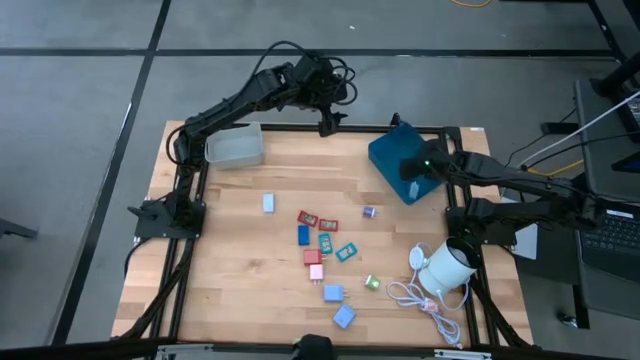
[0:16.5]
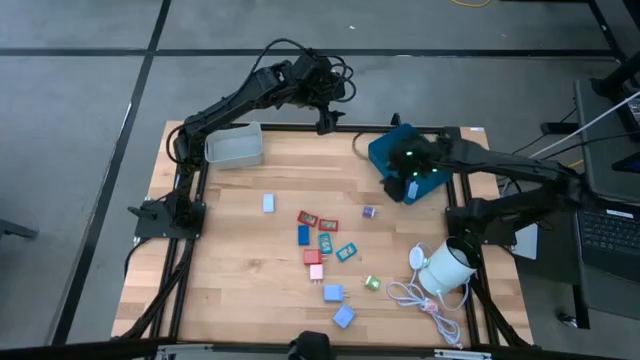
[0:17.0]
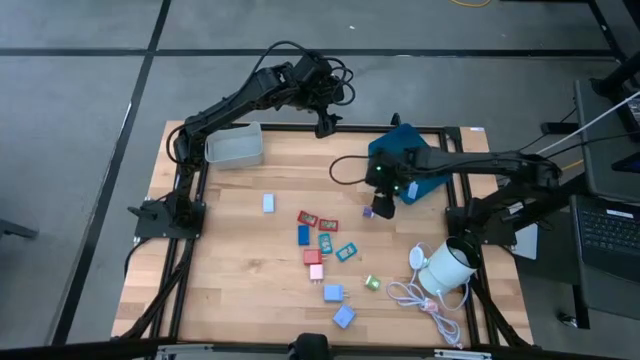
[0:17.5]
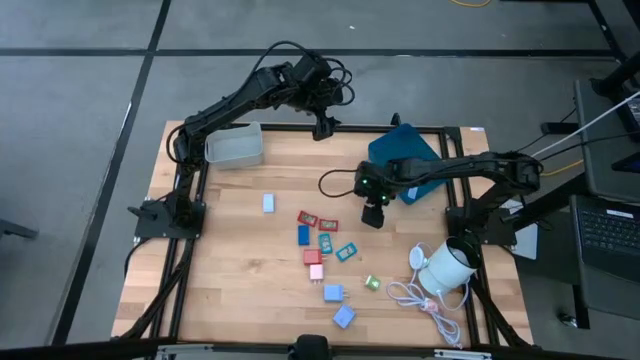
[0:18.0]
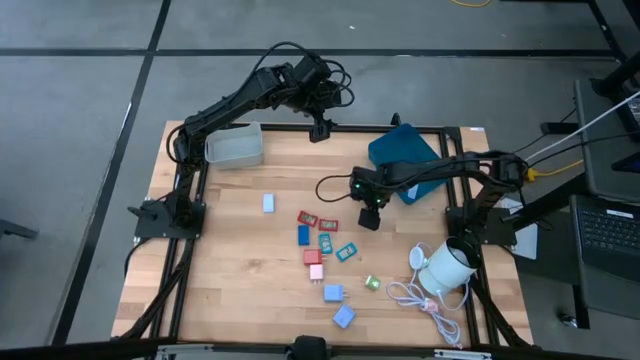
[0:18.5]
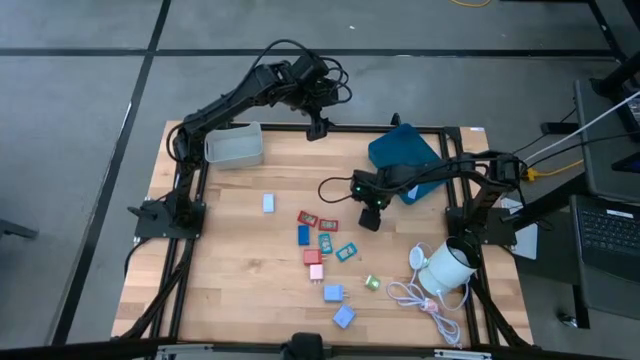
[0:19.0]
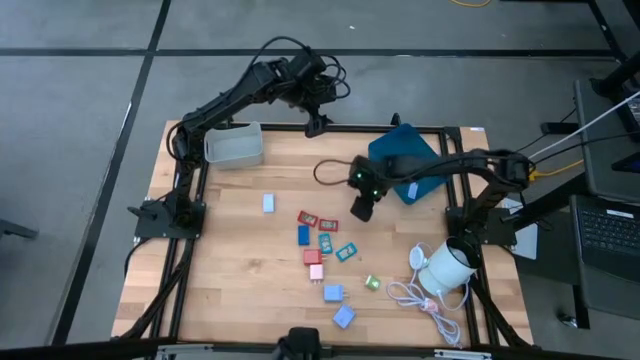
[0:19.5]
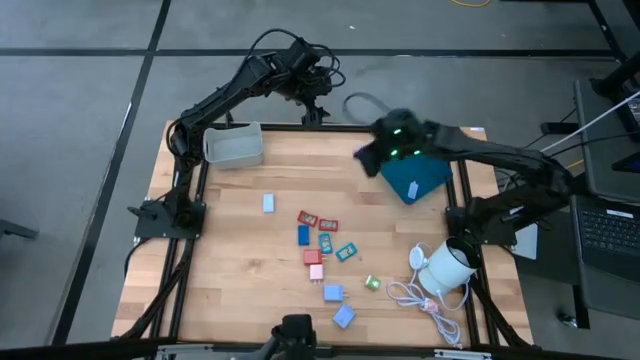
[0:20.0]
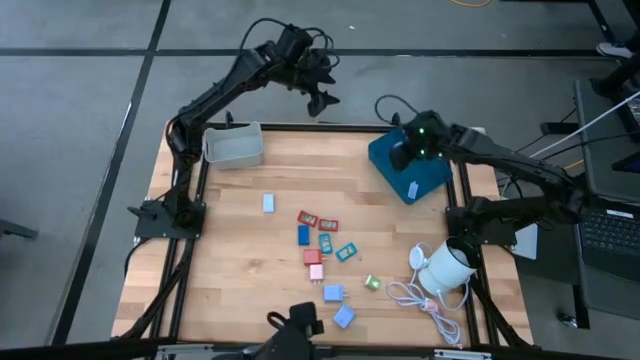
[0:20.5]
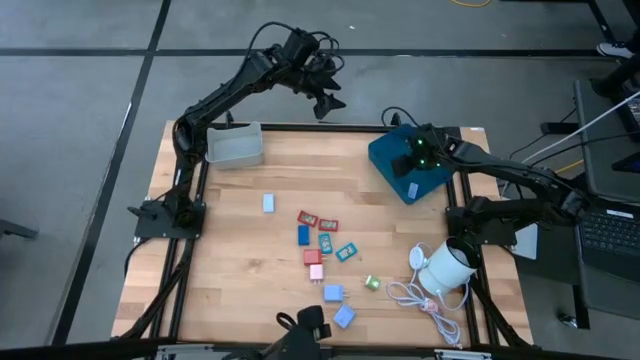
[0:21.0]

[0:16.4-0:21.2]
Task: Pick & Place Office items
Put the violet charger adapter into the blue bin

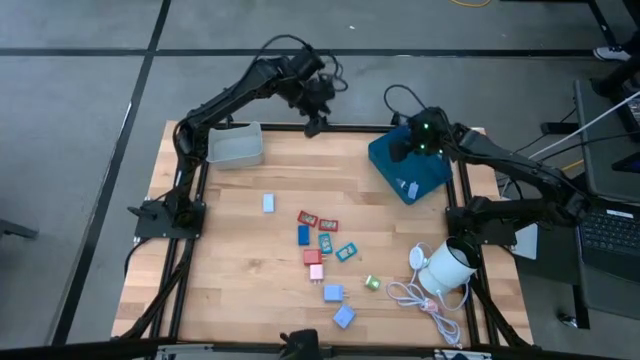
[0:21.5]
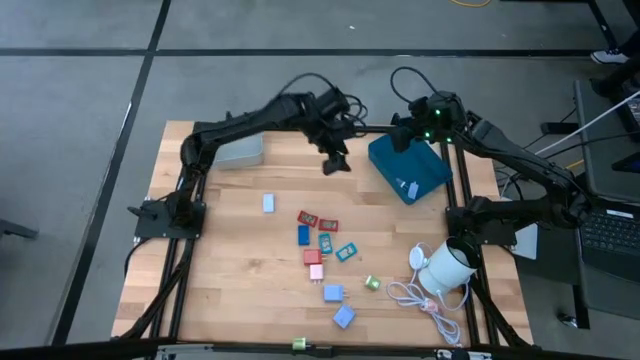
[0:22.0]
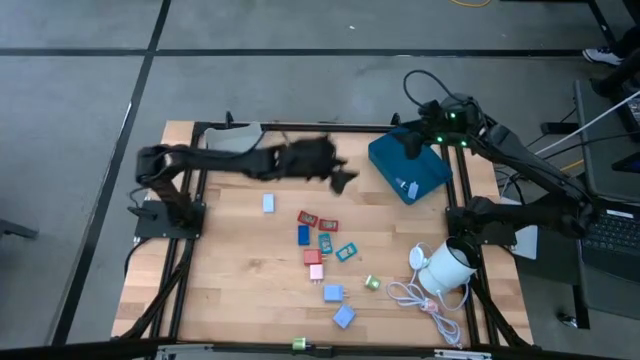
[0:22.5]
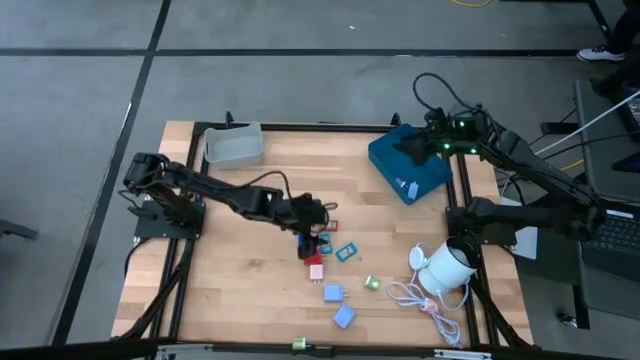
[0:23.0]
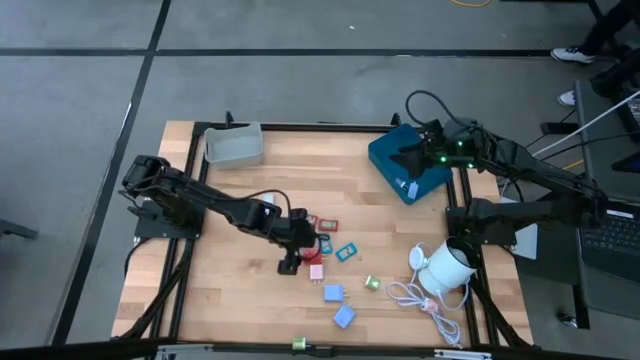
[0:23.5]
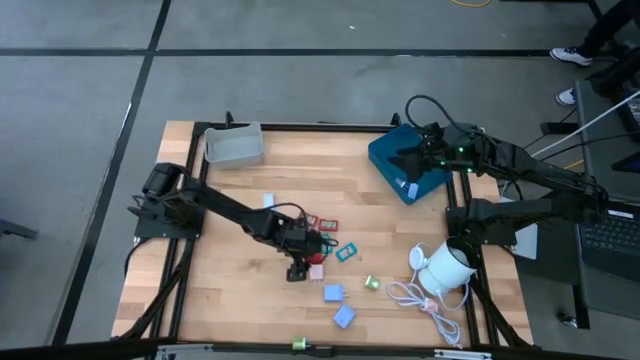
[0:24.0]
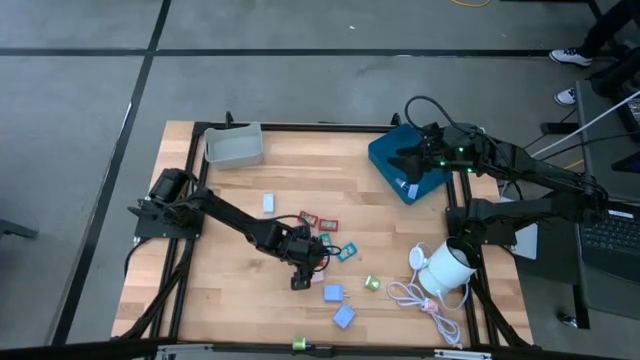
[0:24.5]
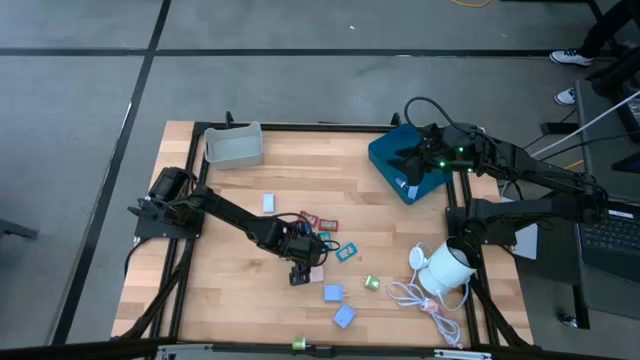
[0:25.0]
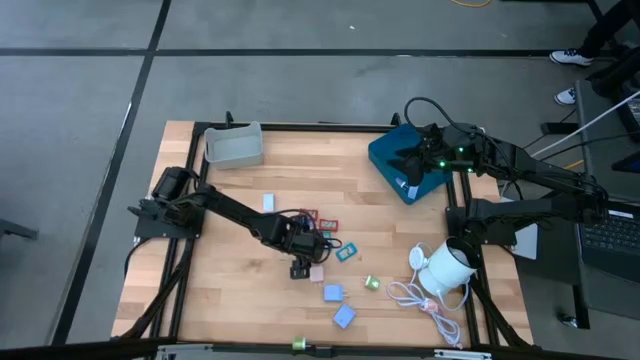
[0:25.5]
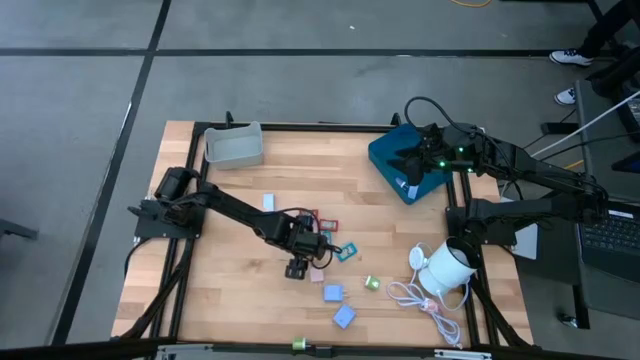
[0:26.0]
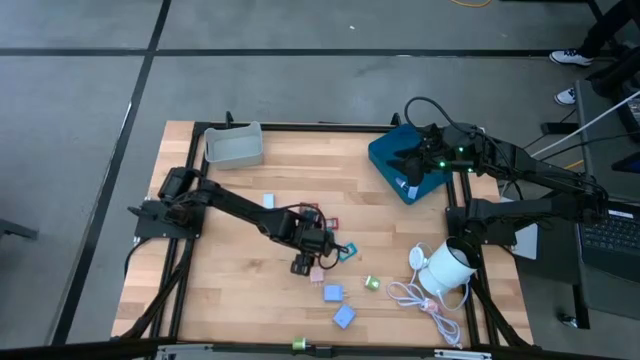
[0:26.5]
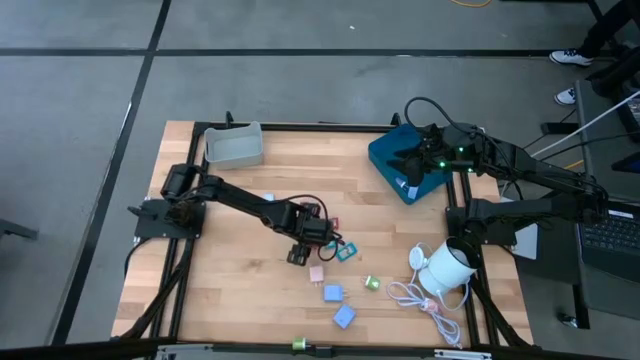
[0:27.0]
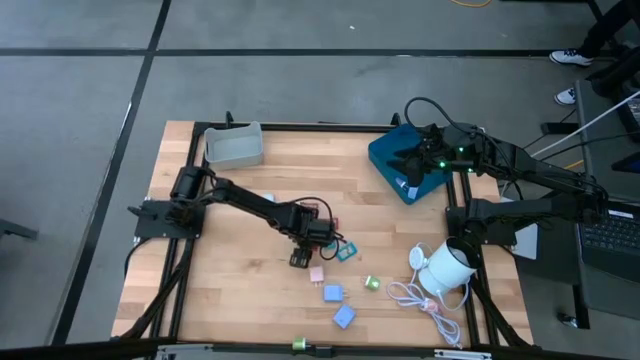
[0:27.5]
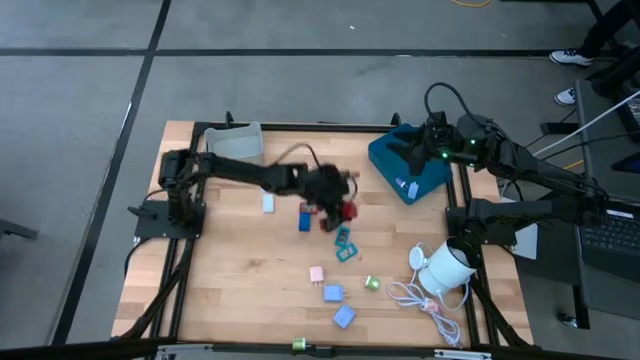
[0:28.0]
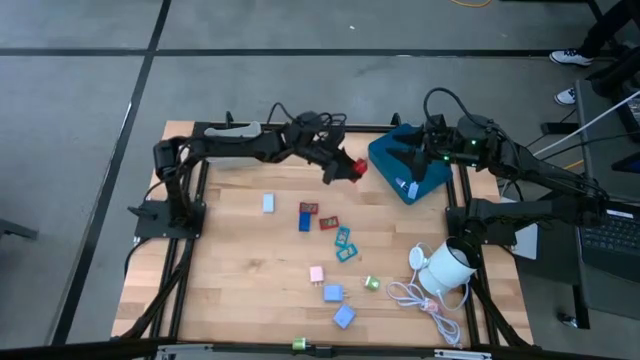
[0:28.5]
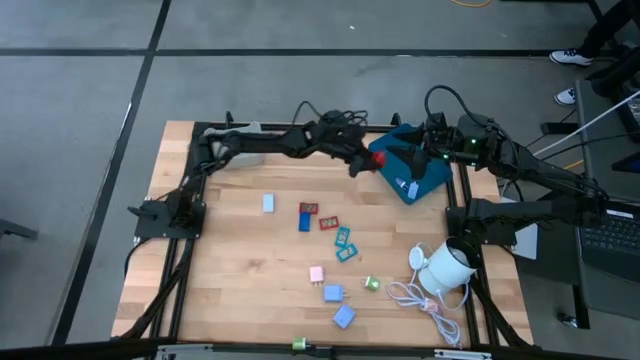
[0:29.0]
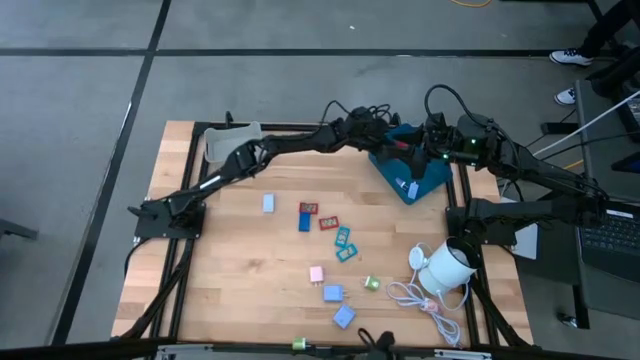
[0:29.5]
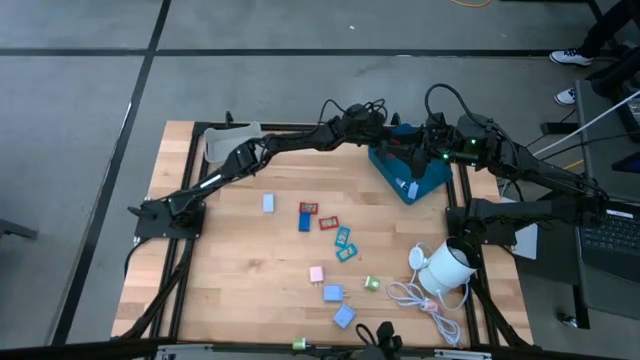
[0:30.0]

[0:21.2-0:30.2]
Put the red charger adapter into the blue bin

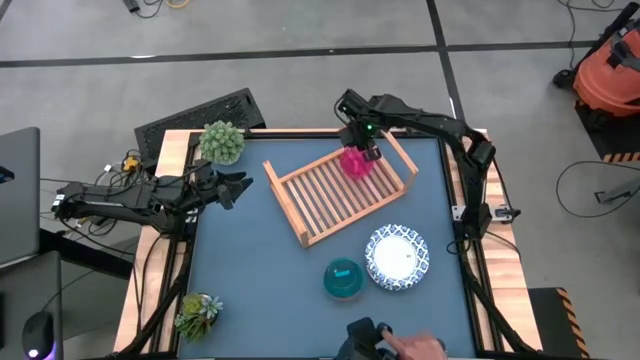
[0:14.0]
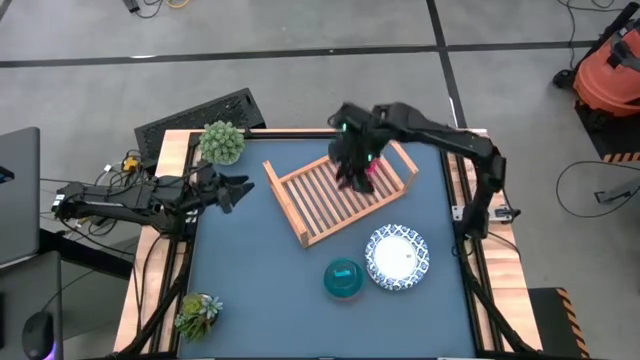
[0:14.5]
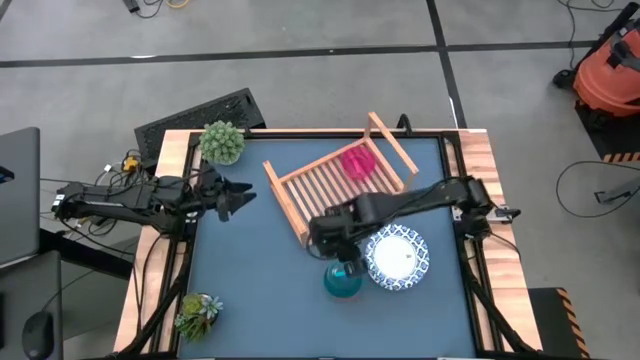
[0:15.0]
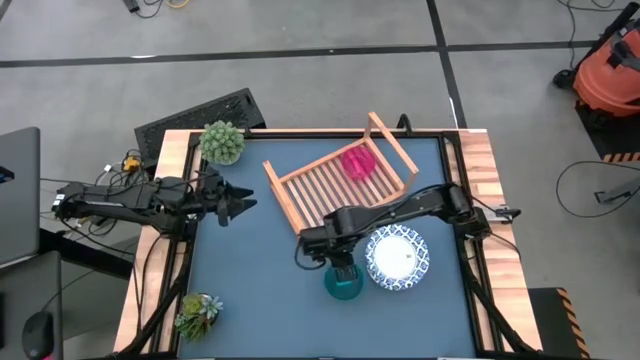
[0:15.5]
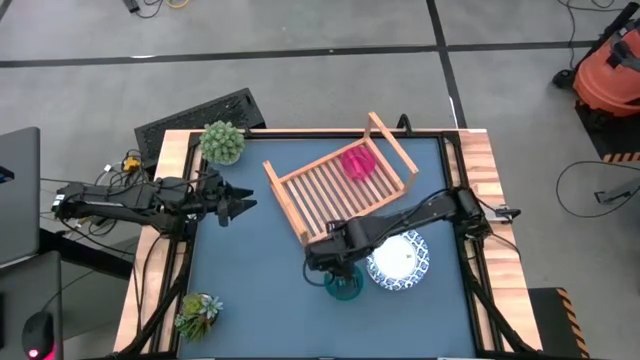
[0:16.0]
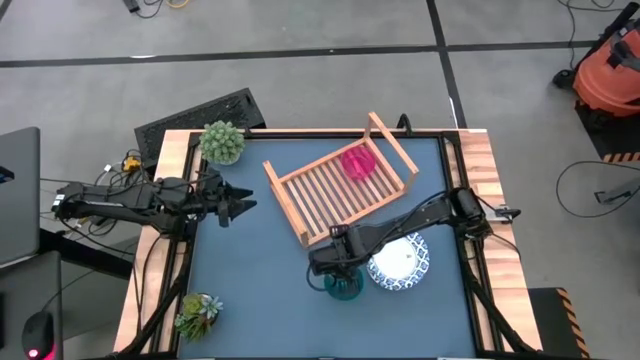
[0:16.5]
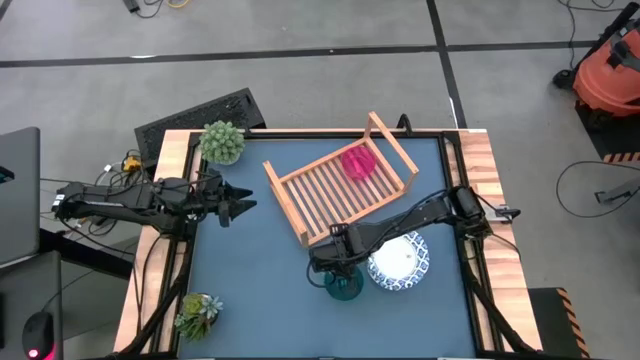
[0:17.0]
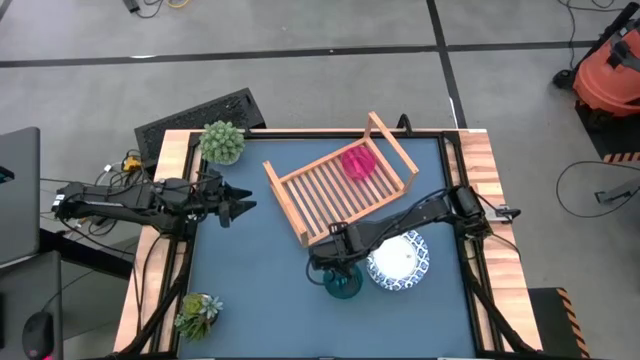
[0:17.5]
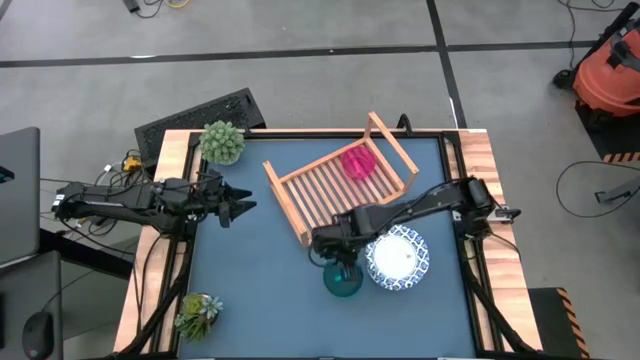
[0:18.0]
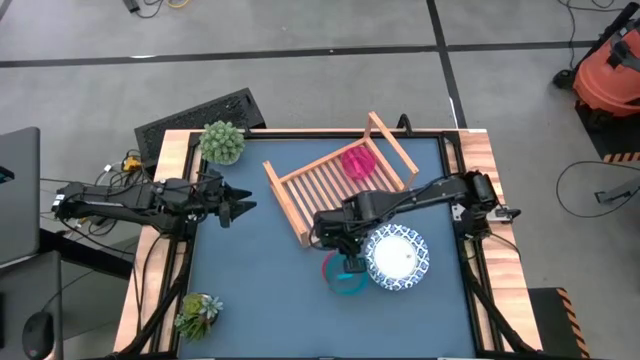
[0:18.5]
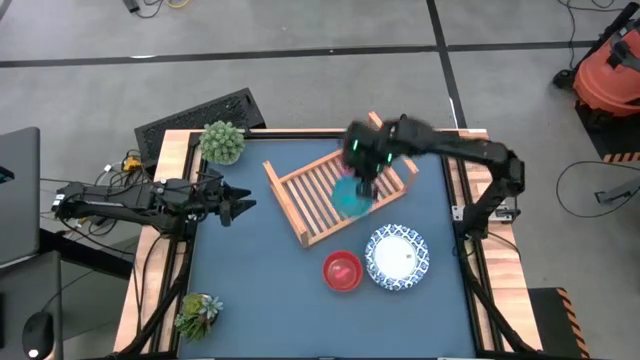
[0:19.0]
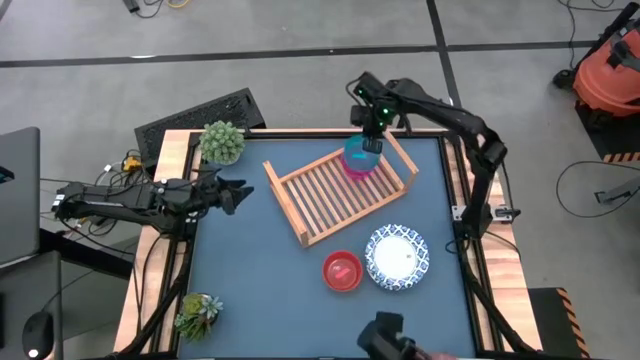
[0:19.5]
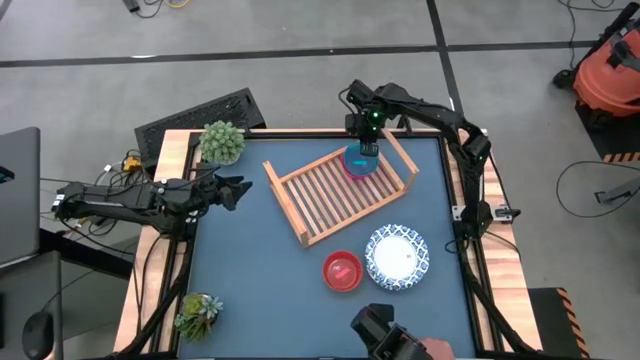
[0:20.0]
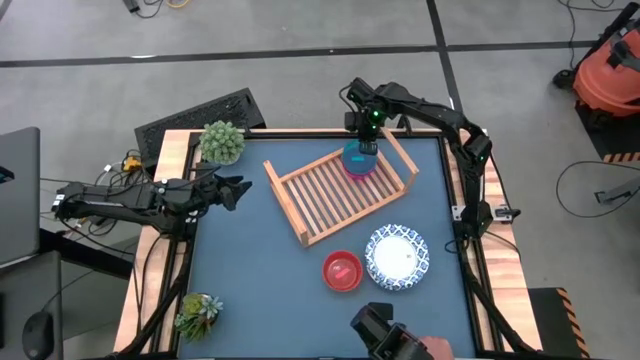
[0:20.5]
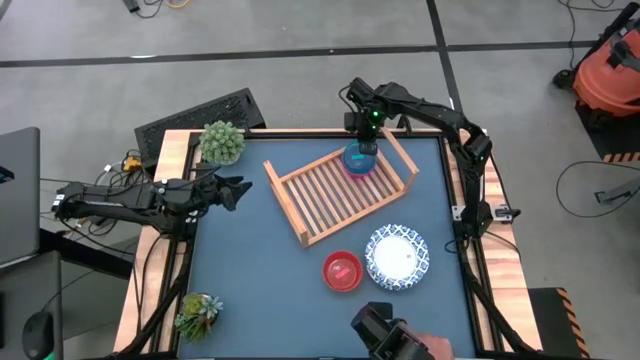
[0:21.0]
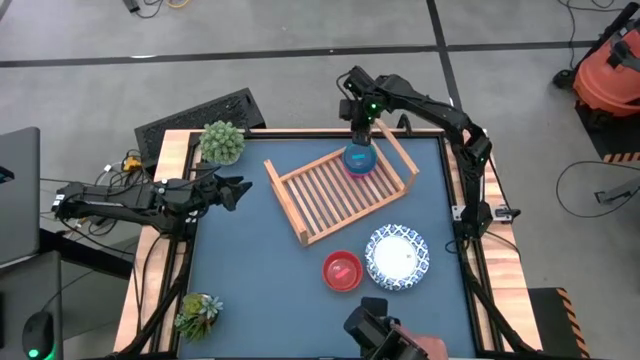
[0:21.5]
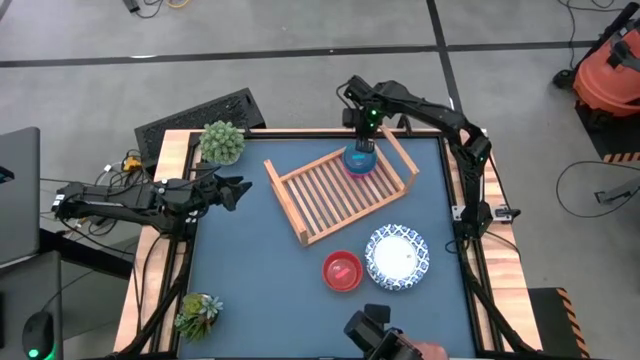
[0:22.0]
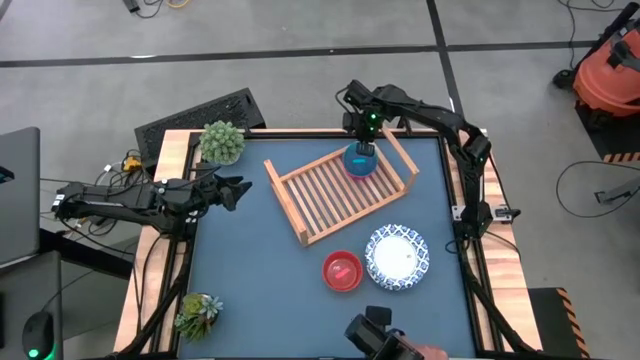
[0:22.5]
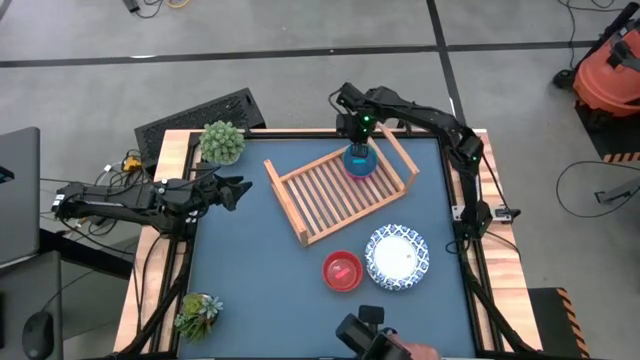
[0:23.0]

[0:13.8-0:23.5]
Task: Place and stack bowls onto a shelf
Stack the blue bowl on top of the pink bowl on the shelf
